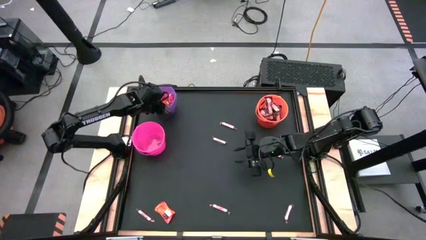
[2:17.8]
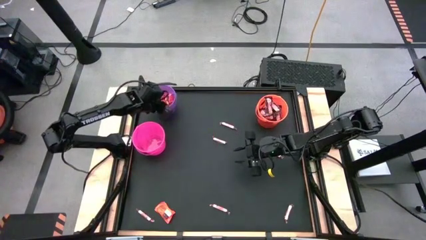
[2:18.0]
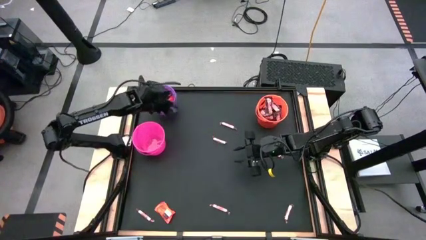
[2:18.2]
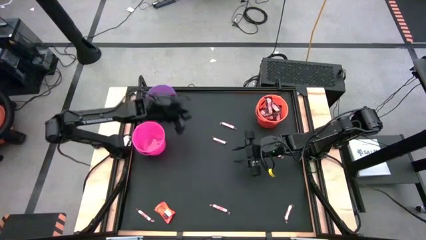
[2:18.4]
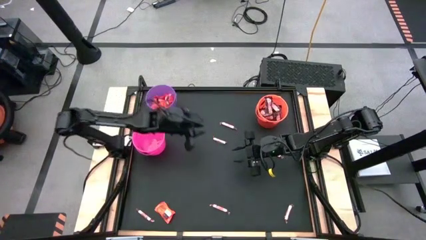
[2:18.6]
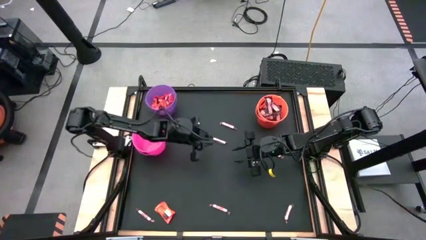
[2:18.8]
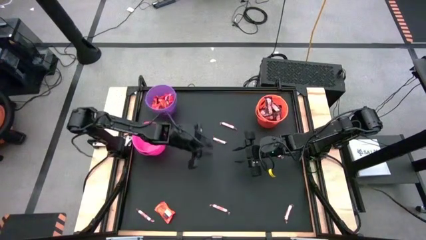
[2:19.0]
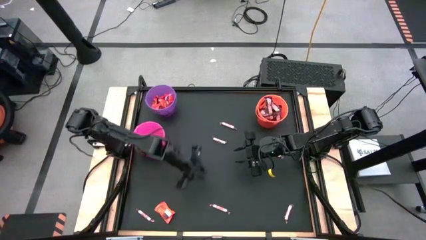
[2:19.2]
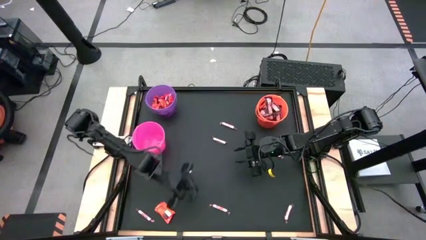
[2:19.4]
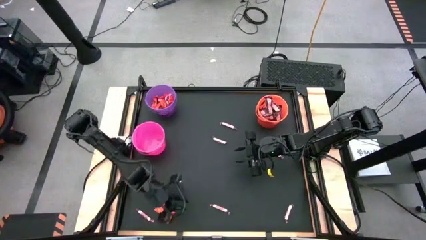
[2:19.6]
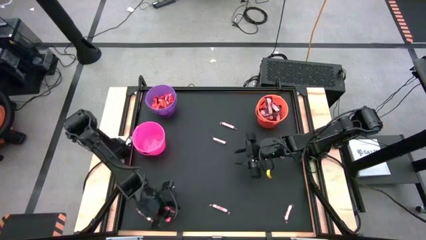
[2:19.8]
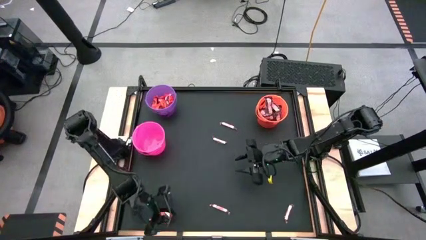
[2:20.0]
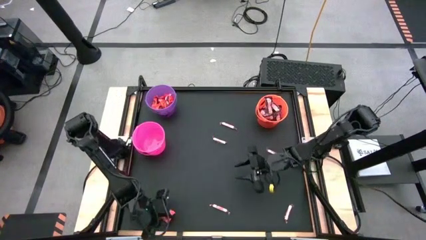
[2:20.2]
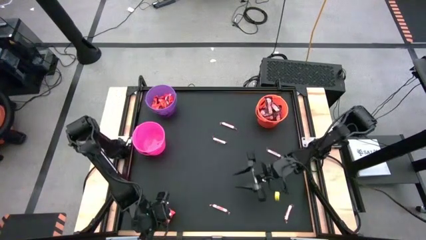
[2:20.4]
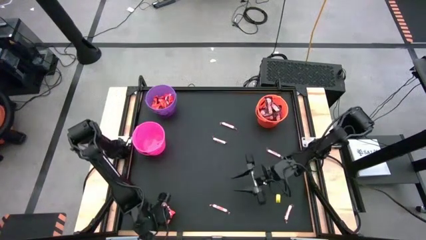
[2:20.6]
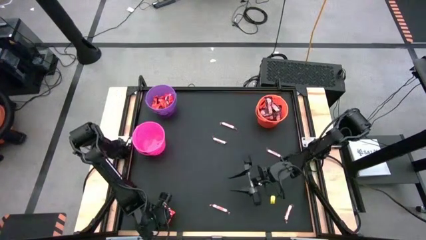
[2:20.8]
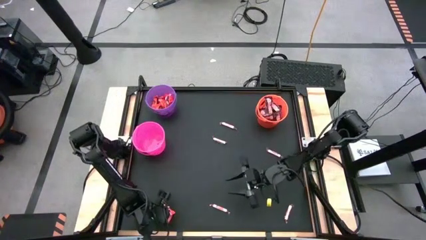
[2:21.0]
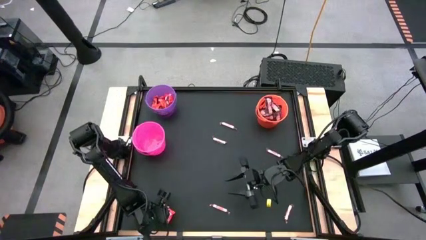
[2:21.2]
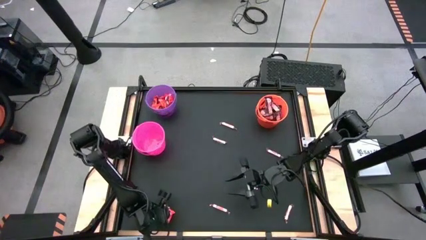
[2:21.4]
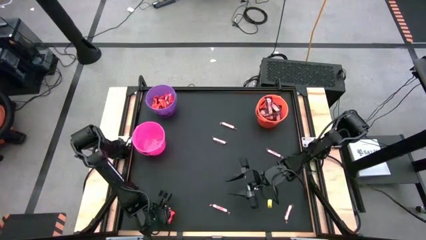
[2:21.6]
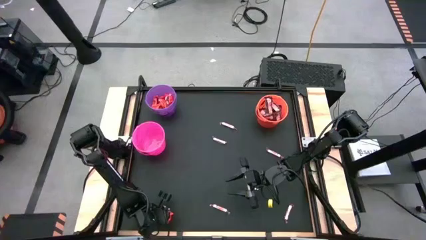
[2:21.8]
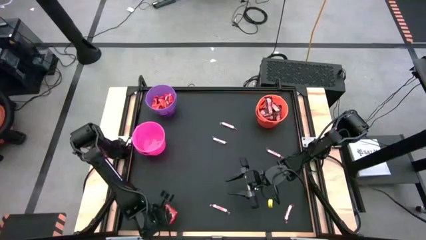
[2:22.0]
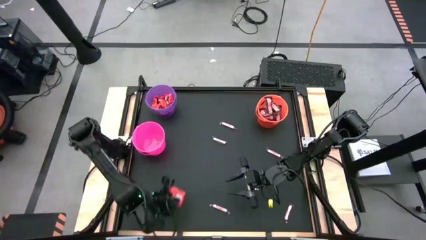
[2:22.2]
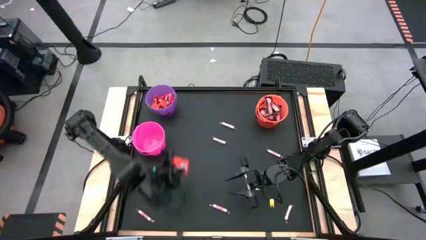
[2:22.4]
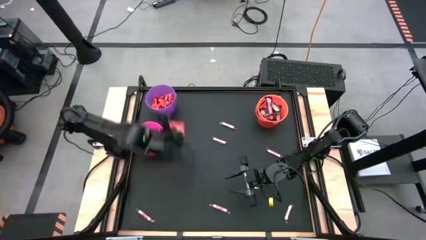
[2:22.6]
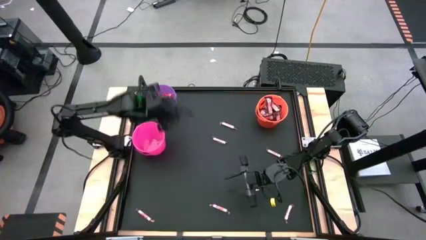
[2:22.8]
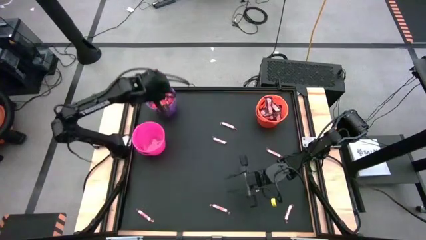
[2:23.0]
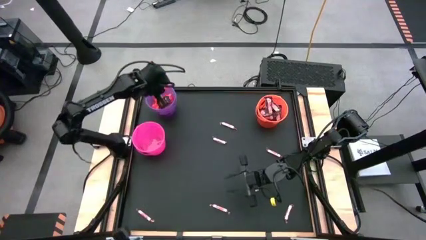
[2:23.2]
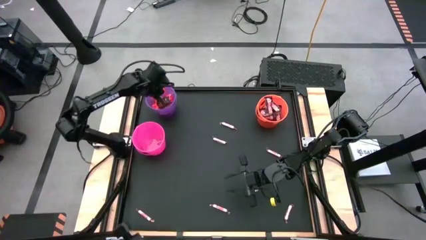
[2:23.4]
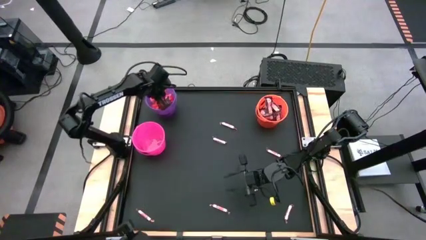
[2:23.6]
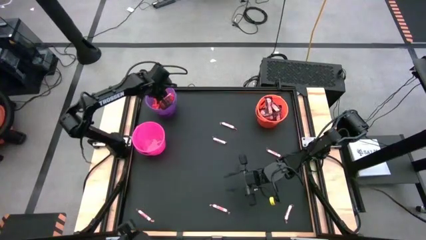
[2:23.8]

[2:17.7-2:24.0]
Task: Sort candy by brand, put in halloween buckets
Put the orange candy into the purple bucket

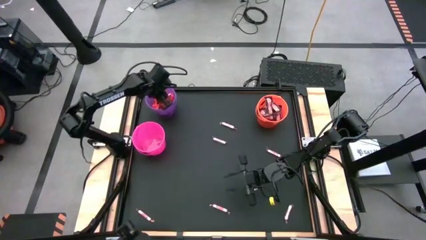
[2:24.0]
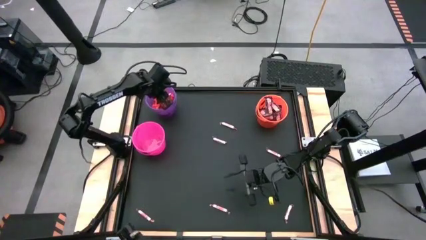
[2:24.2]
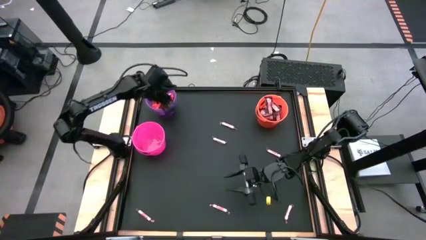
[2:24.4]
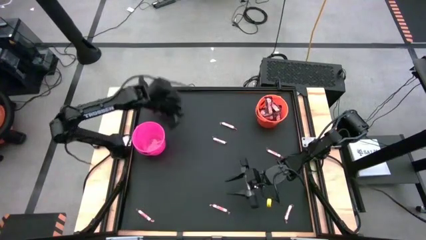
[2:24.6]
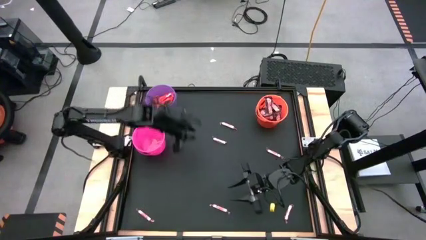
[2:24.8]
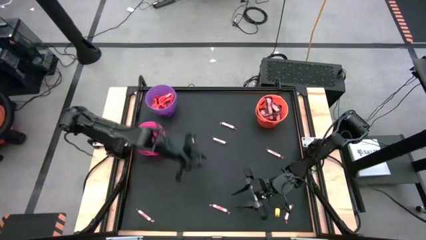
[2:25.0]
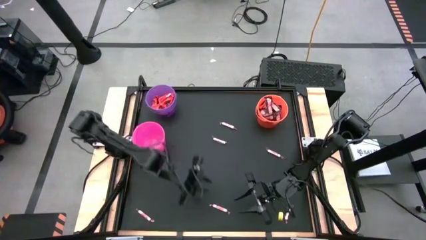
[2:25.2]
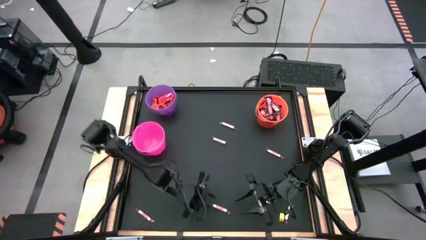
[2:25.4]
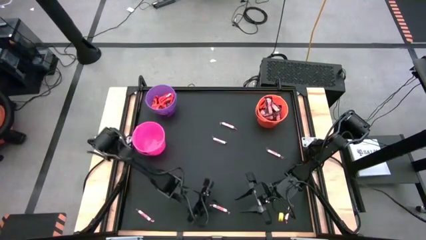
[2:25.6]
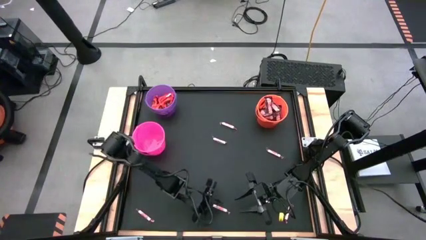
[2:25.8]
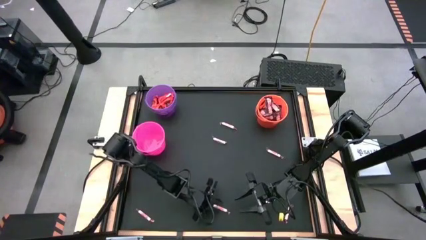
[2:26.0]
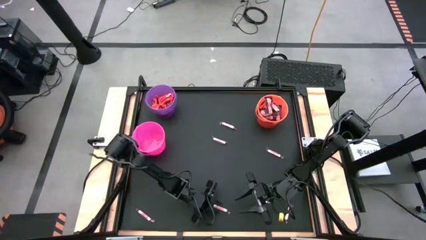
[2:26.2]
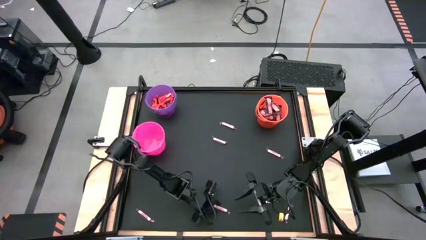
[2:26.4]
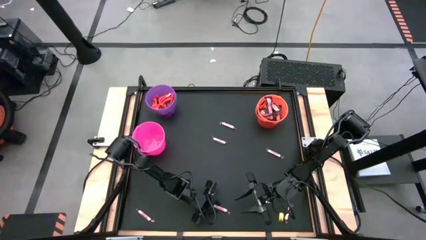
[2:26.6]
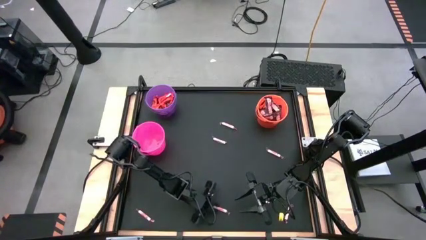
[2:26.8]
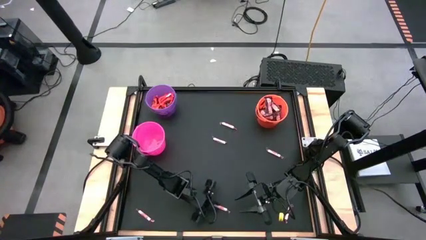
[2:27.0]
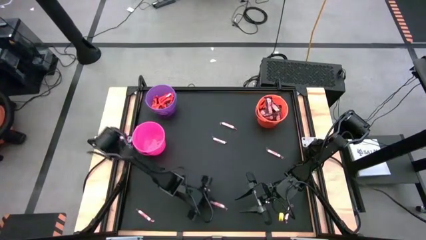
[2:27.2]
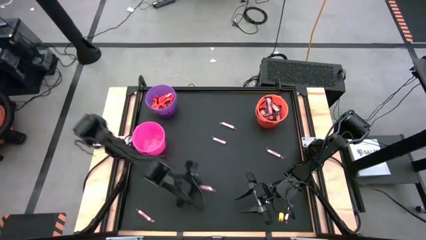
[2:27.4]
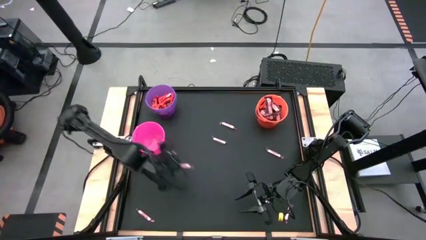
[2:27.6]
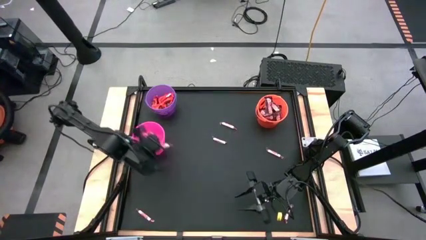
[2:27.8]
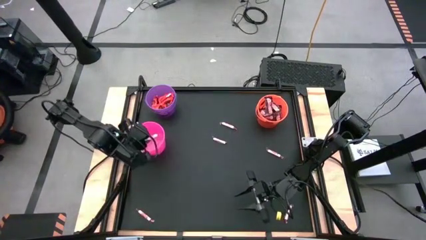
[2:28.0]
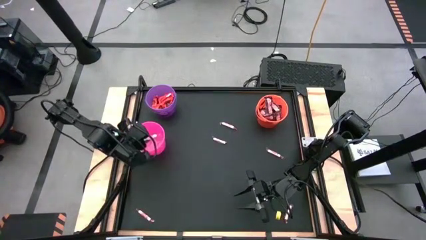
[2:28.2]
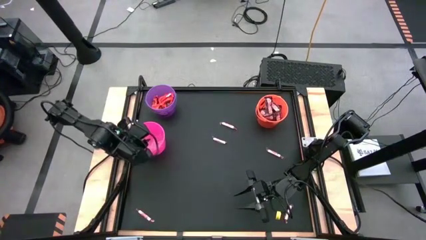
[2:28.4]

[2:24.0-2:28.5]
Put the red candy into the pink bucket

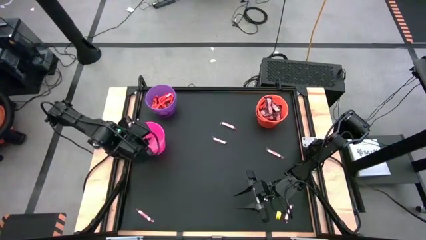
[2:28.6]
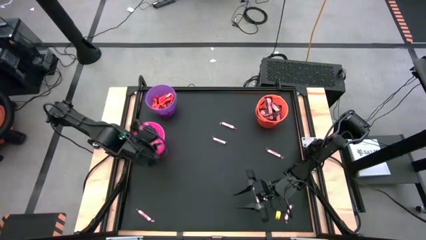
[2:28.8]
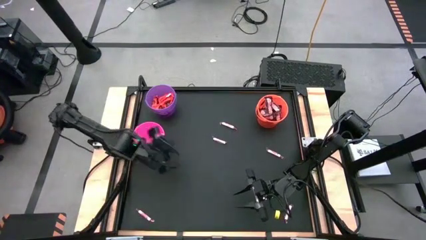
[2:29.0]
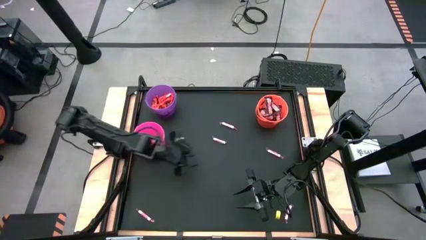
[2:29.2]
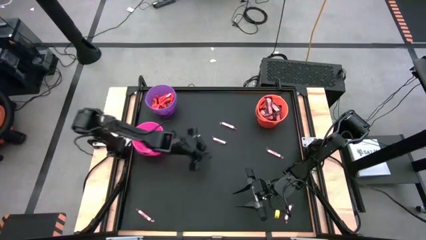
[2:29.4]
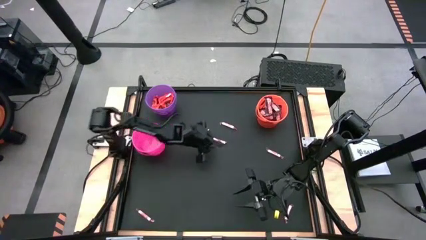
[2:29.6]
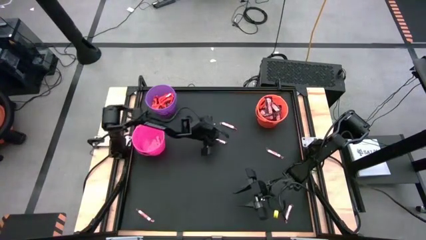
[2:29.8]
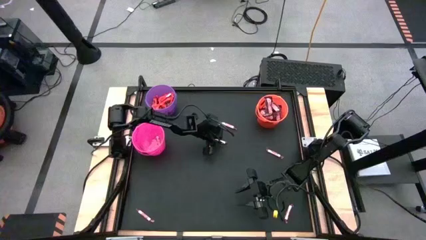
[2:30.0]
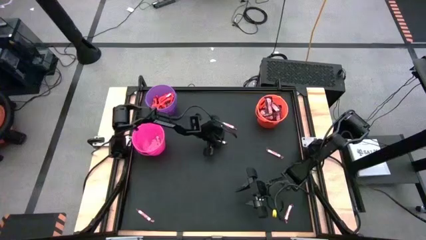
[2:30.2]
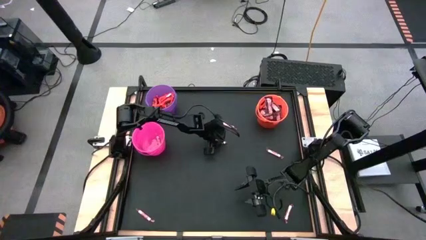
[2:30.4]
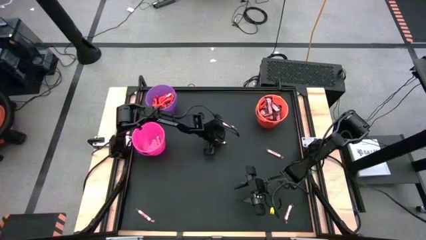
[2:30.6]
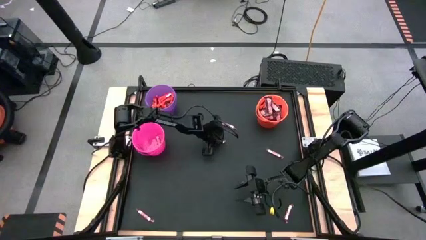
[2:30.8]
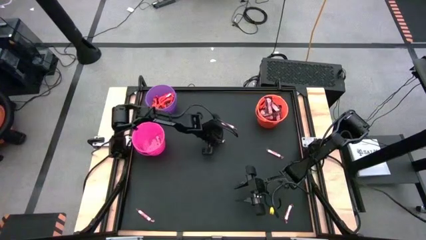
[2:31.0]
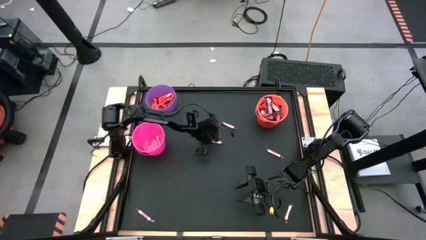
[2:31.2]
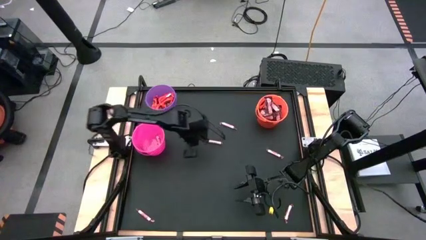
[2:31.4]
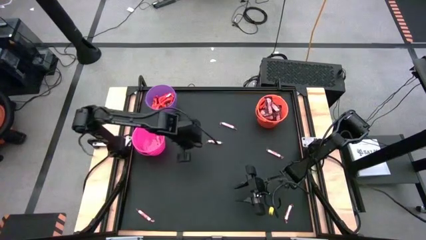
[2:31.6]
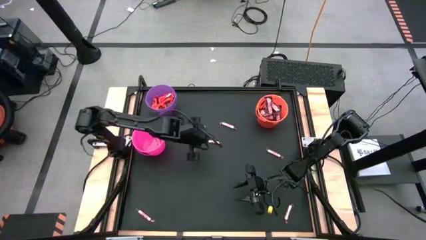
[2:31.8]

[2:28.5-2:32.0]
Put the red candy into the pink bucket

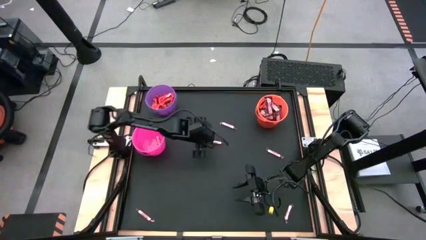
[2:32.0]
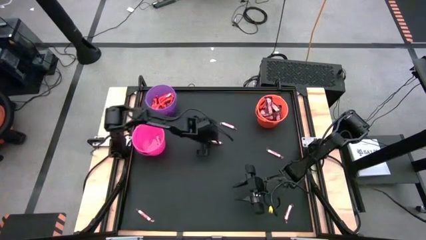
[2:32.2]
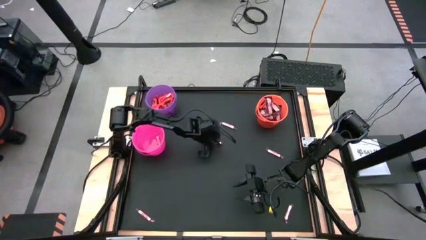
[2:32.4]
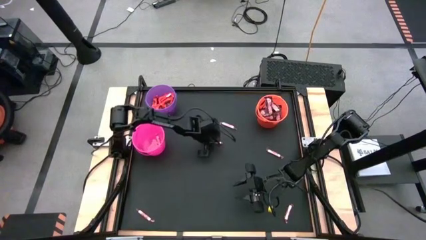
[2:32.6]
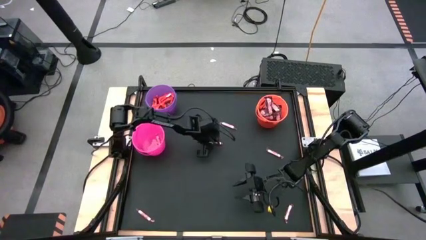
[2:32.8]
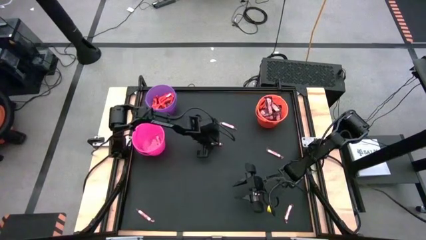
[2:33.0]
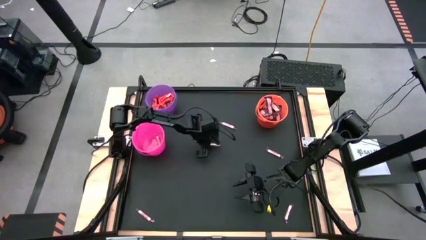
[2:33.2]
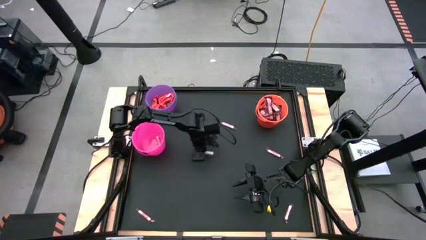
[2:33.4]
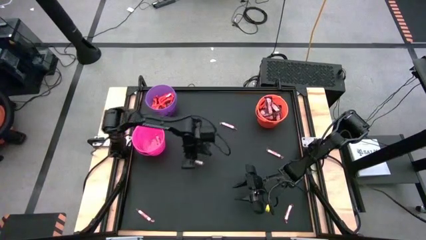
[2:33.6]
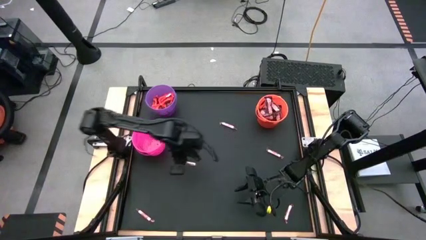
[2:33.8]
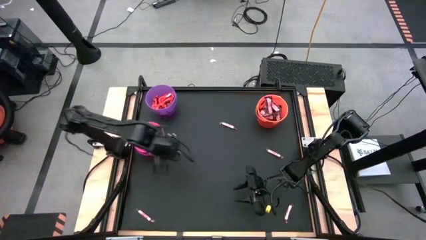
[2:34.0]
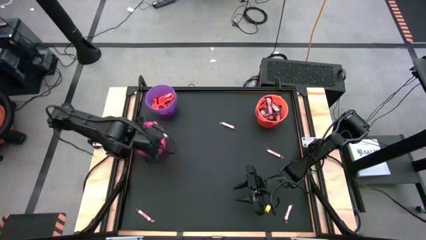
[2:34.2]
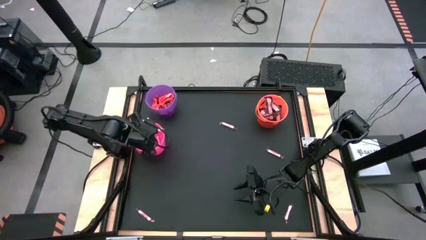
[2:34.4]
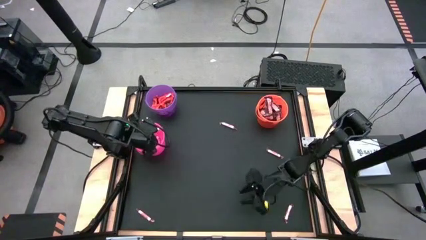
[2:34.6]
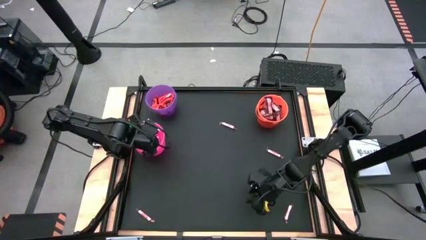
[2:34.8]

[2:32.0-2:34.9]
Put the red candy into the pink bucket
